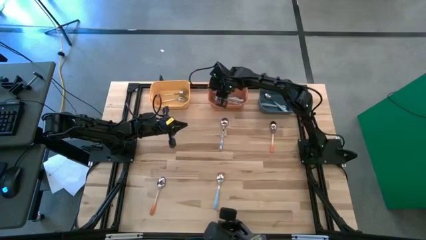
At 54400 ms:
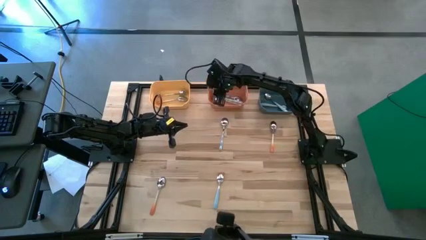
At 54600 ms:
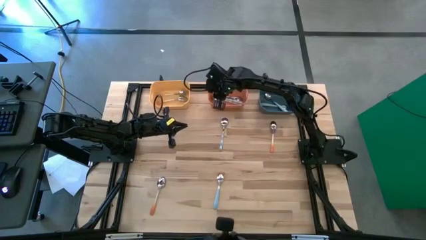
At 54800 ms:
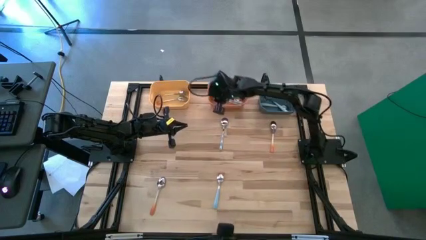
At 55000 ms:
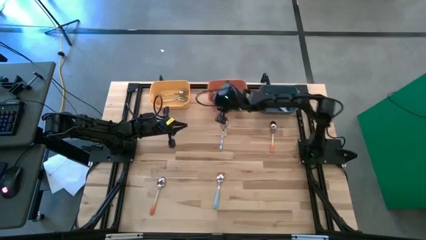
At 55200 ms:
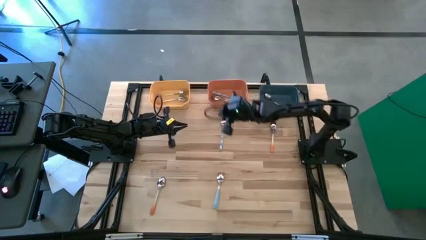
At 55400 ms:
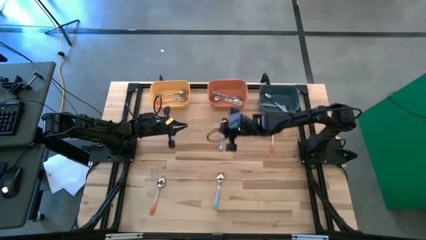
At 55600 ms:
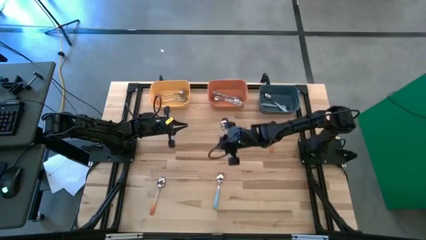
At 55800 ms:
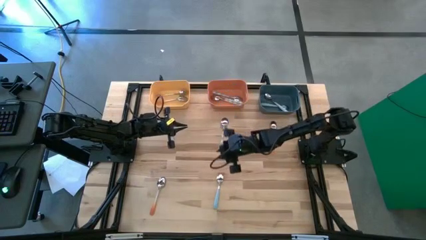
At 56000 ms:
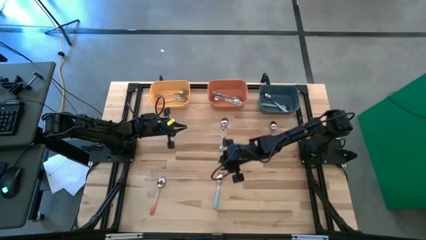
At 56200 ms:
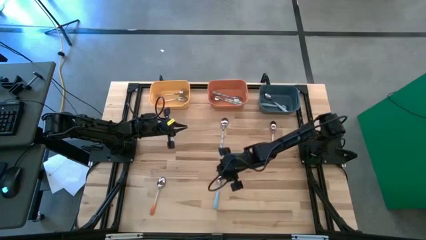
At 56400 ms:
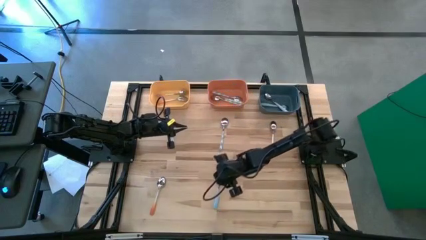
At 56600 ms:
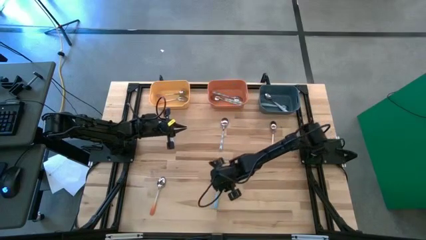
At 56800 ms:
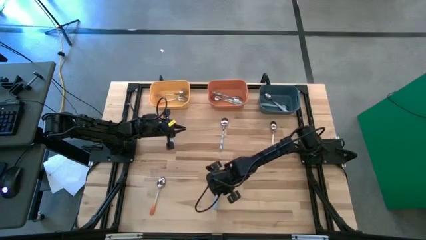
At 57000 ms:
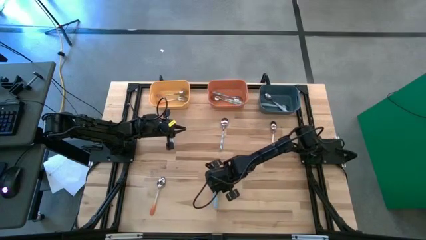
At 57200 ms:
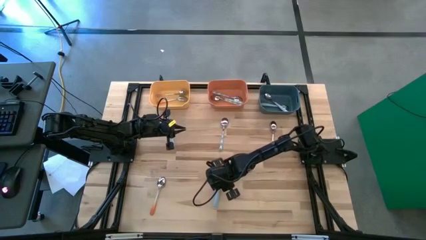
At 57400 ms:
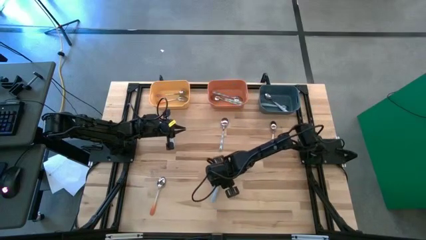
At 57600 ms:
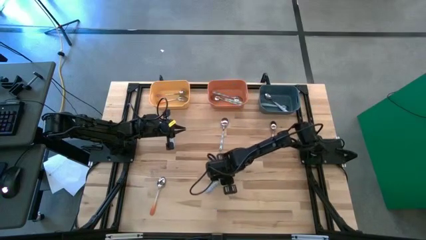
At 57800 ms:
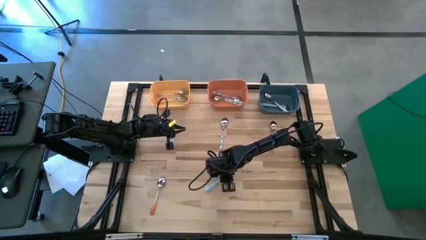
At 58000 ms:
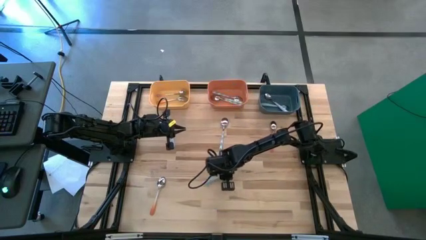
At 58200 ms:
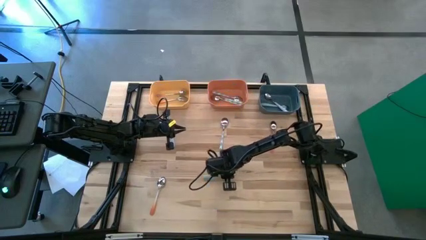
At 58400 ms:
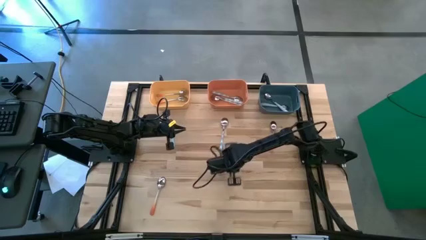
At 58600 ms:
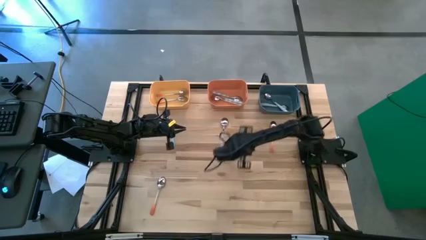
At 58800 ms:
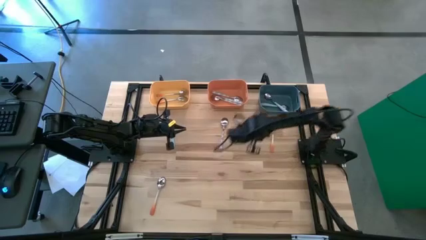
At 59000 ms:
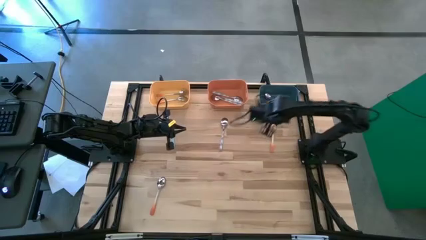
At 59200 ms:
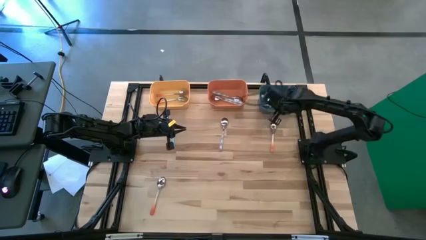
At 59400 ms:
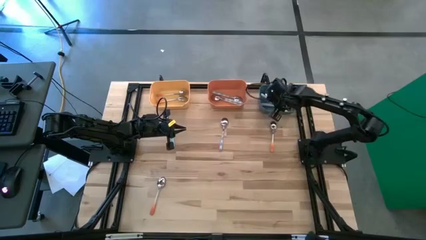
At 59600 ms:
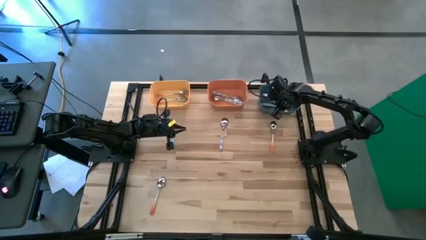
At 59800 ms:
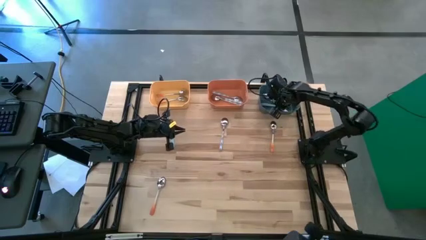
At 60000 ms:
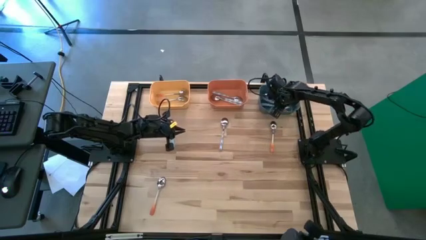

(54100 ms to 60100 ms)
Task: Sort silverware by color (type)
Put the blue spoon into the blue bin

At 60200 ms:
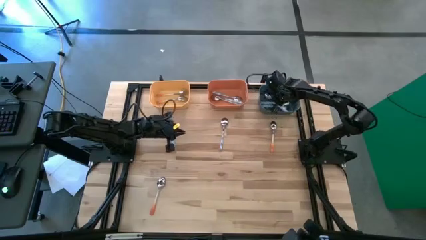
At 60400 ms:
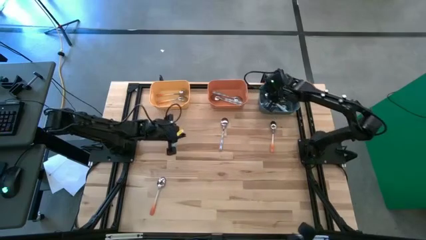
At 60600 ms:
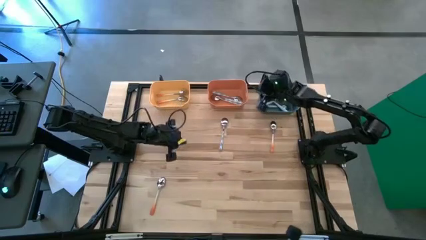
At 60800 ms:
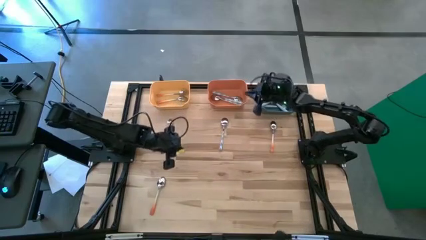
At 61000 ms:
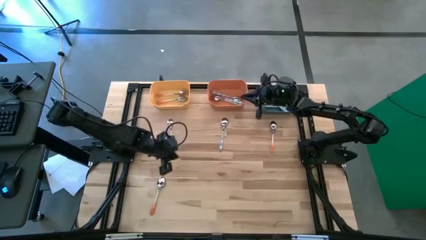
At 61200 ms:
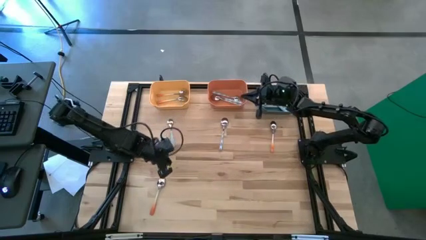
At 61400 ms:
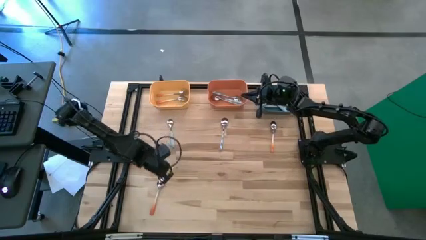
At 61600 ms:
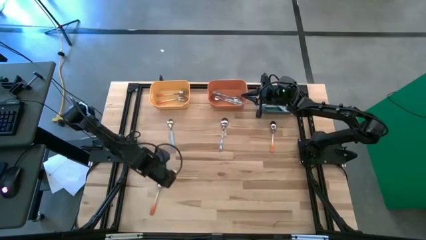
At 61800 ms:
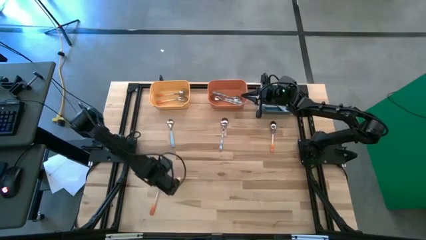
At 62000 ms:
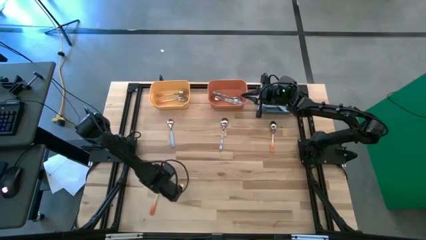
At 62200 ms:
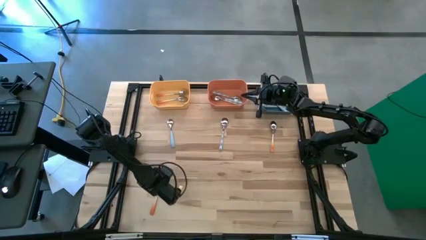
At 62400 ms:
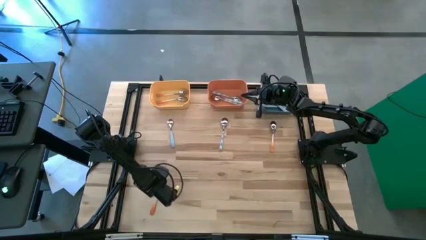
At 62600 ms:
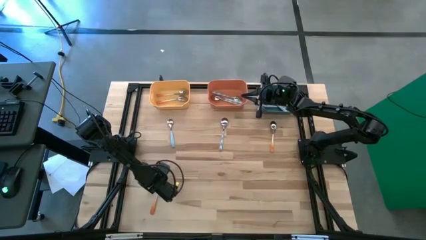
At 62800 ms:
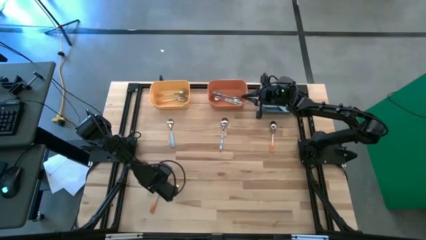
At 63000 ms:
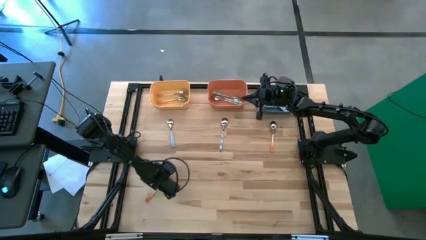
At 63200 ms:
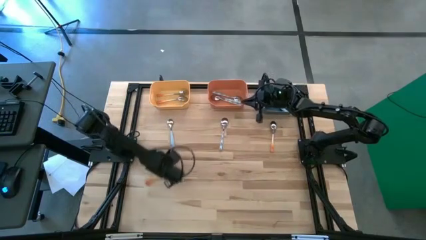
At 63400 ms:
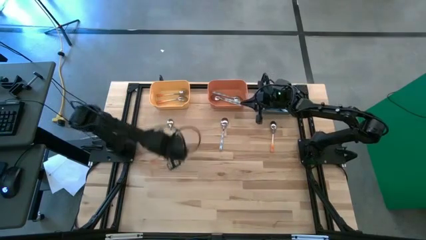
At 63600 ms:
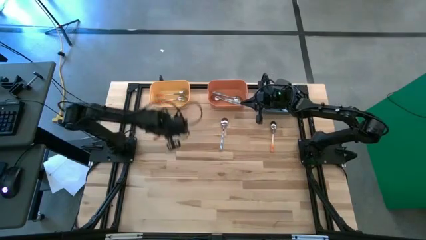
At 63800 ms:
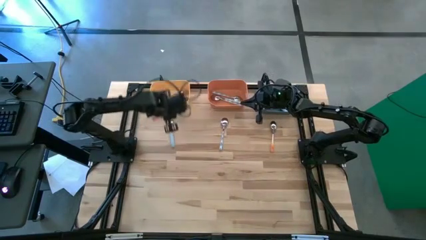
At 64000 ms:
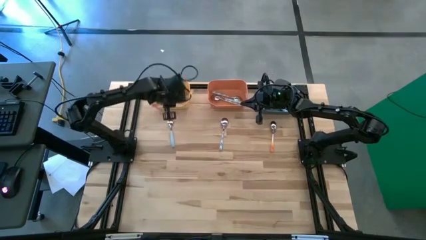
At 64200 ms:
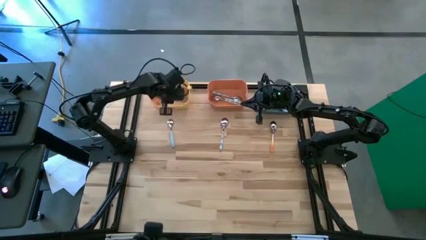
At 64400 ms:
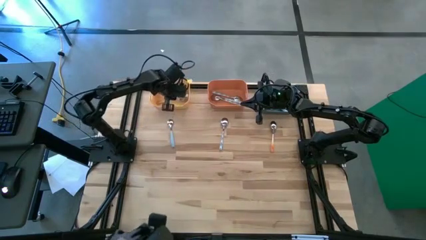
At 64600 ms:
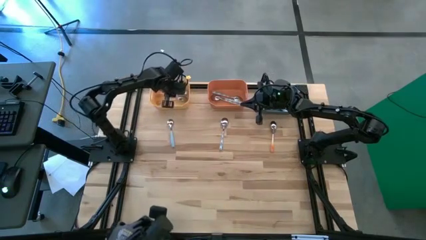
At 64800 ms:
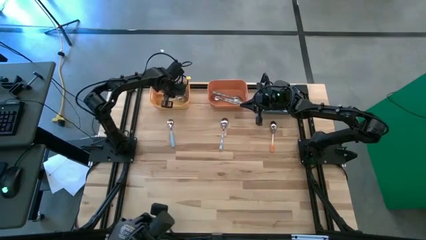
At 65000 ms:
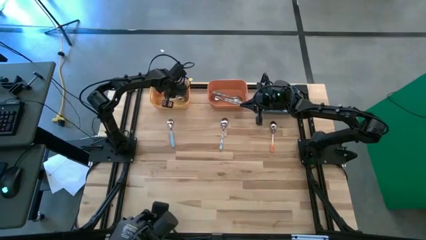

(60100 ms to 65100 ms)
Put the orange spoon into the yellow bin

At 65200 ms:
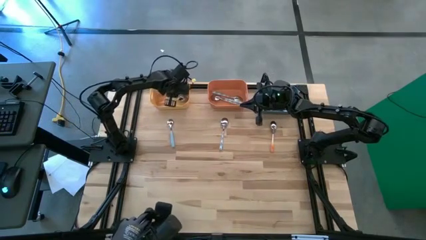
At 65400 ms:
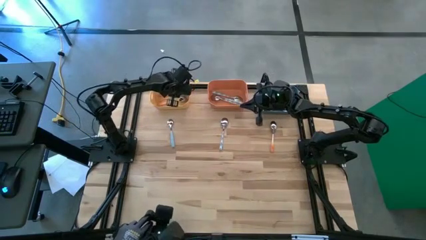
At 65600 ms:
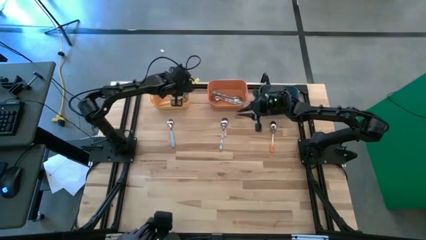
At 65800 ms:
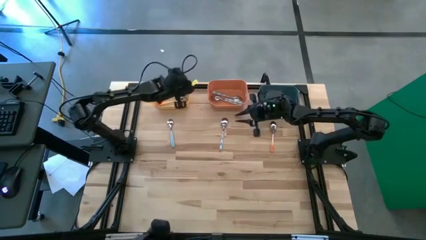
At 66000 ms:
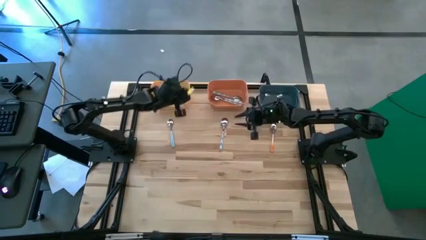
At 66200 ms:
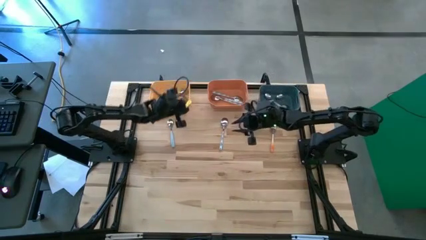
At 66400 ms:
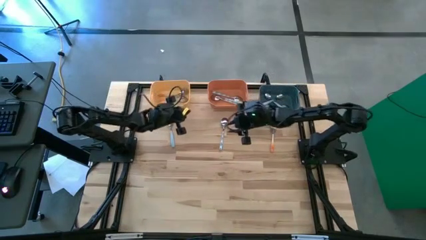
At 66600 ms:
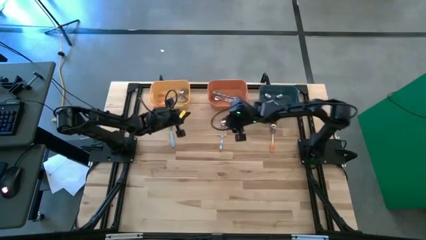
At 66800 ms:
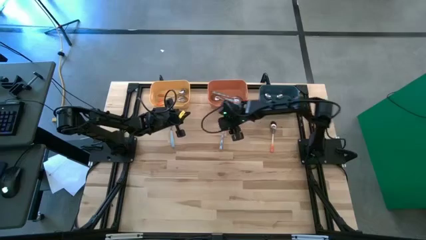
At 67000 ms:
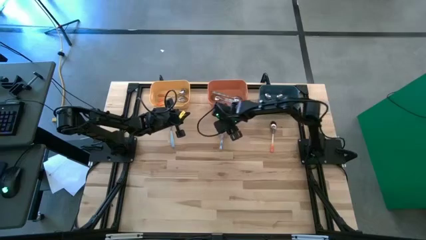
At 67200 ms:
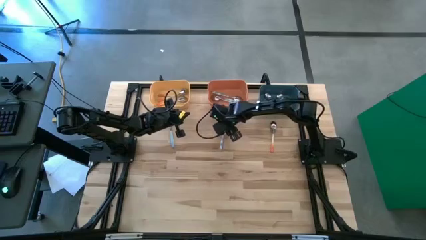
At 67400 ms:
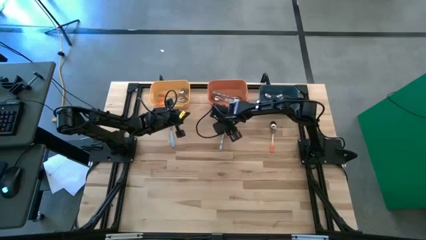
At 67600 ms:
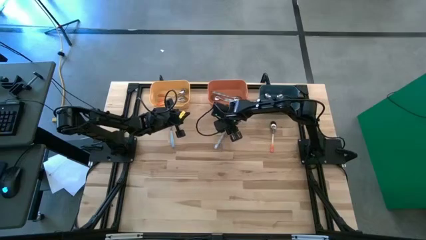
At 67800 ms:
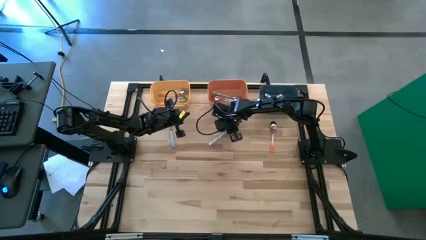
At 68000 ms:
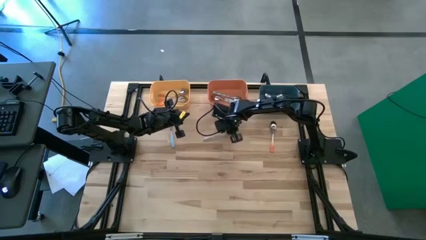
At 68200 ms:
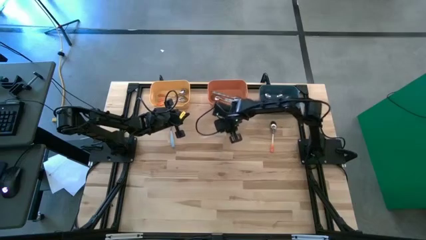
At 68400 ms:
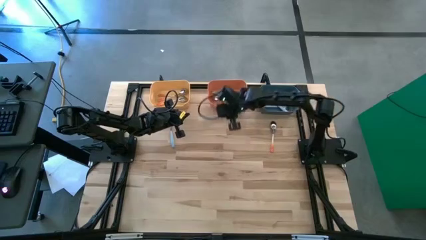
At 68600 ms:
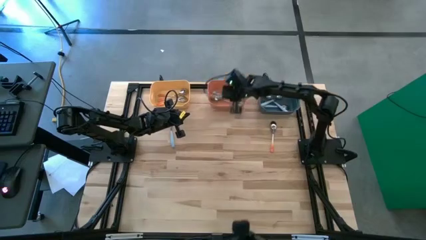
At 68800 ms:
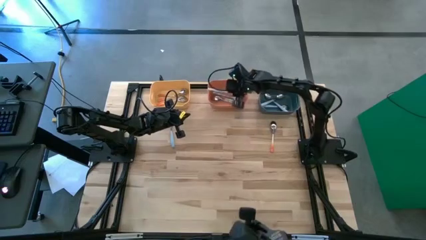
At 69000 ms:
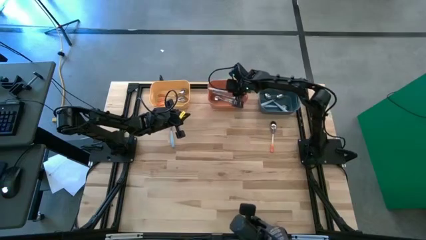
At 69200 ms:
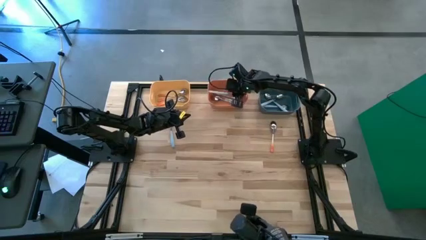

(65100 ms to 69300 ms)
Put the white spoon into the orange bin

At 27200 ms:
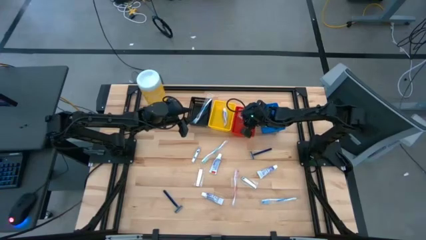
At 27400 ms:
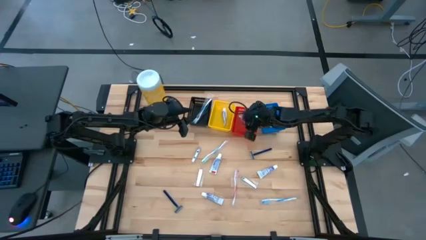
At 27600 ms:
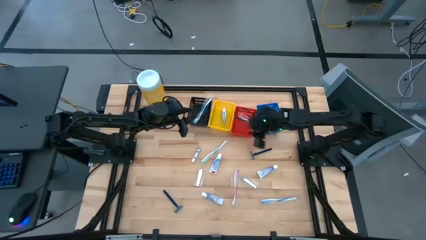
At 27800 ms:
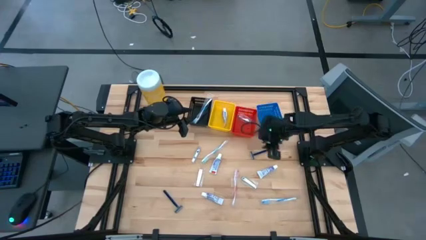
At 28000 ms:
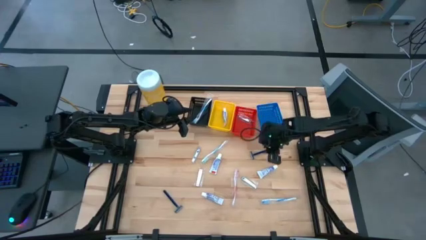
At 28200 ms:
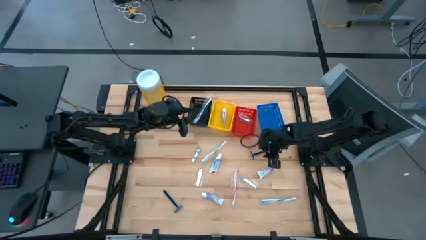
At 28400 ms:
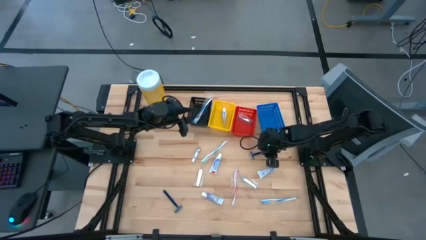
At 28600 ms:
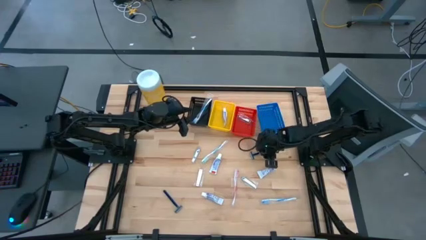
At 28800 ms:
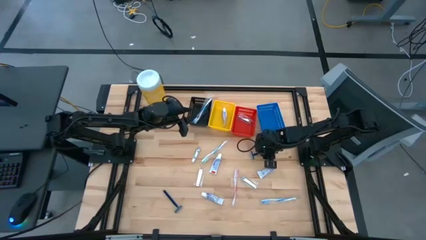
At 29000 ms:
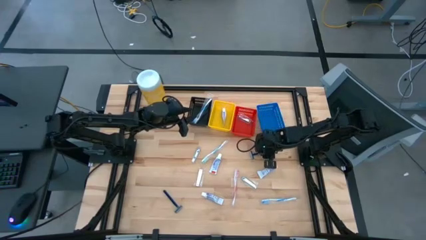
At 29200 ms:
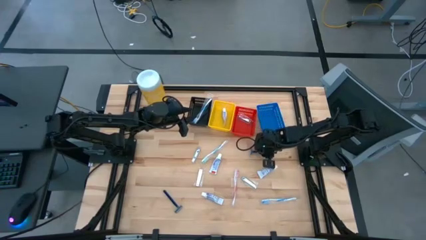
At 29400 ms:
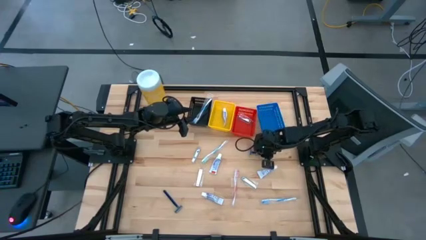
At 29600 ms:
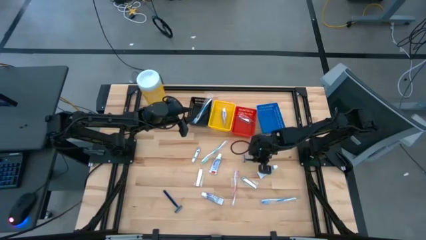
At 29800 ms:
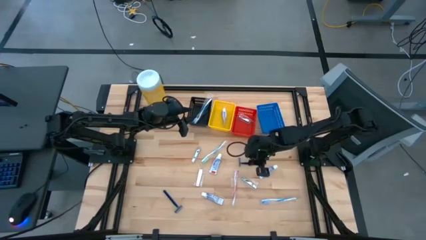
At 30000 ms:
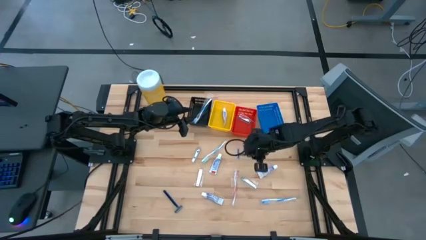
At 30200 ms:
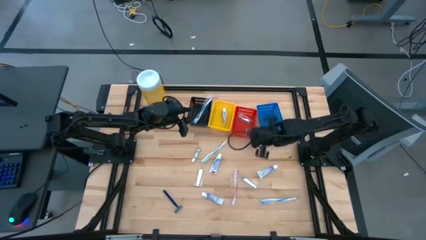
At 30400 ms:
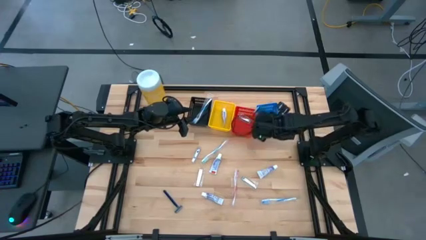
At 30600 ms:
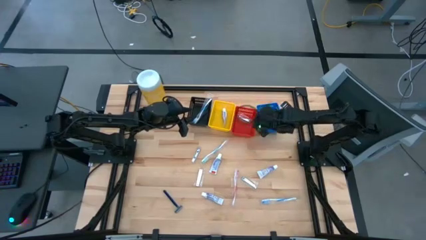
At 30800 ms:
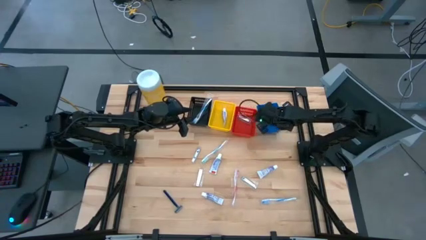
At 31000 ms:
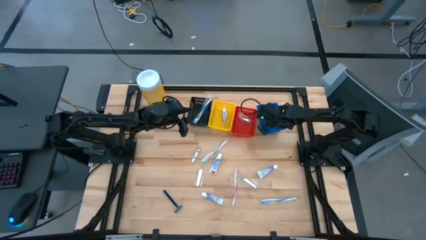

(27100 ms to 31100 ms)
Task: Pick & Place Travel size toiletries
Put the blue razor into the blue bin
